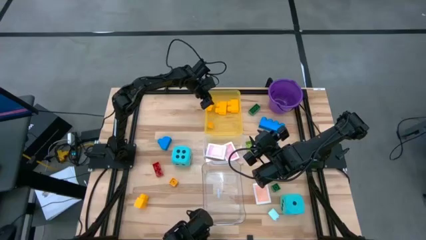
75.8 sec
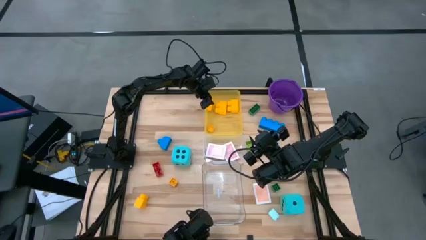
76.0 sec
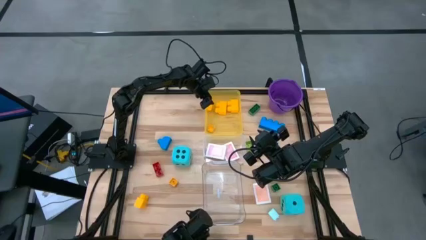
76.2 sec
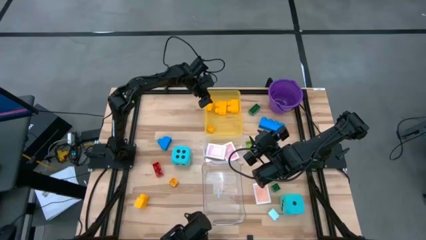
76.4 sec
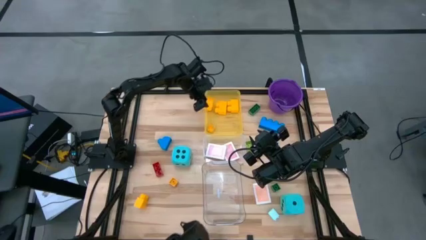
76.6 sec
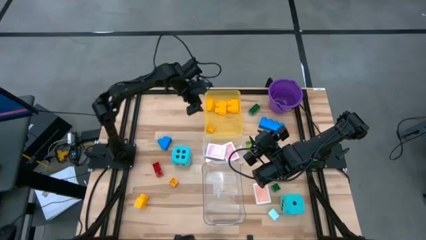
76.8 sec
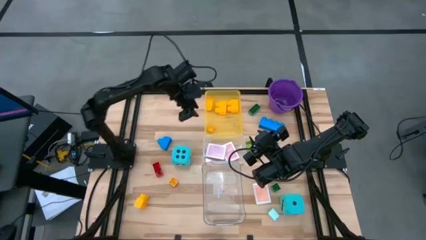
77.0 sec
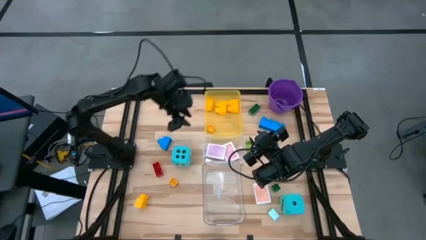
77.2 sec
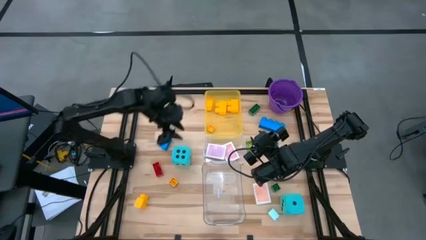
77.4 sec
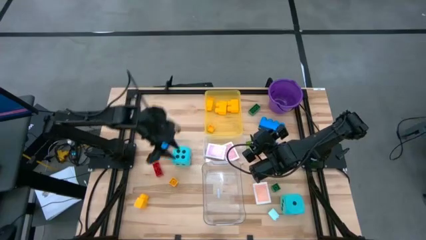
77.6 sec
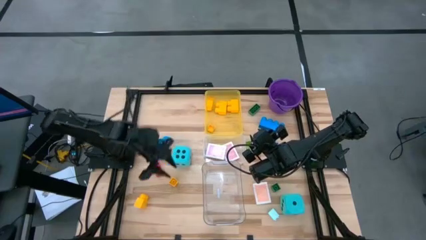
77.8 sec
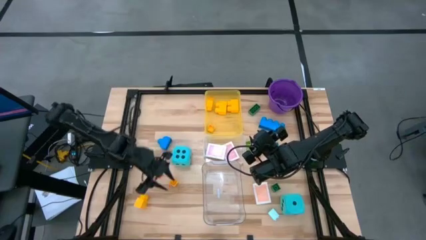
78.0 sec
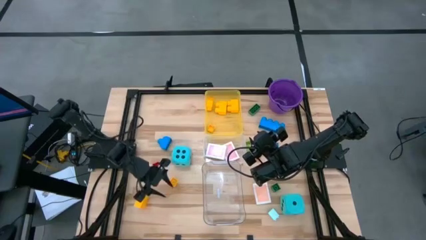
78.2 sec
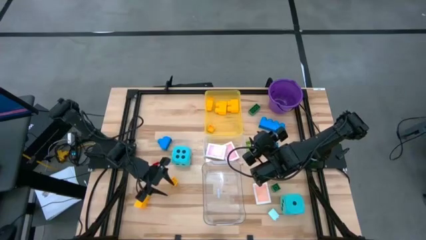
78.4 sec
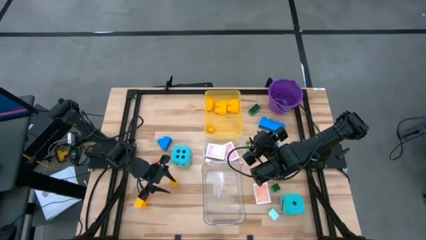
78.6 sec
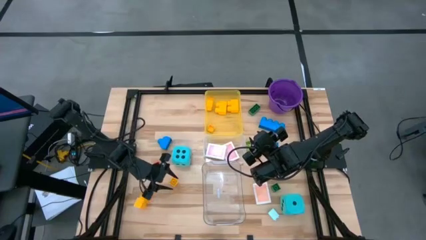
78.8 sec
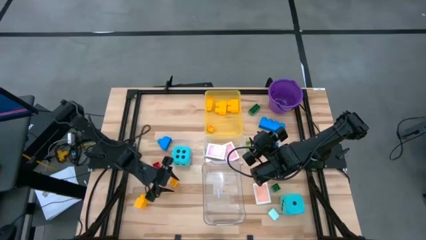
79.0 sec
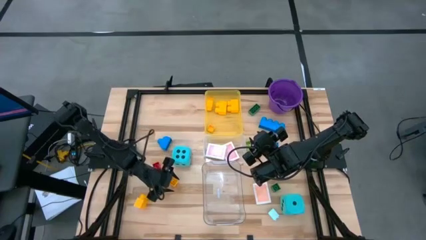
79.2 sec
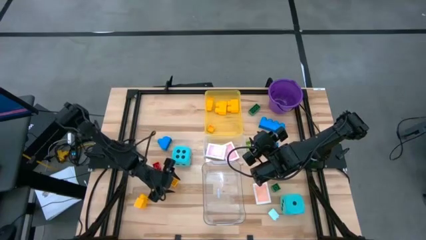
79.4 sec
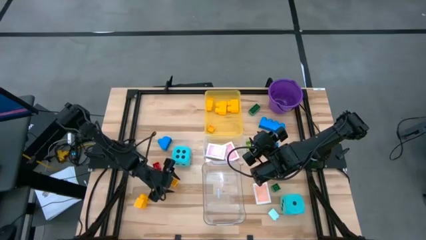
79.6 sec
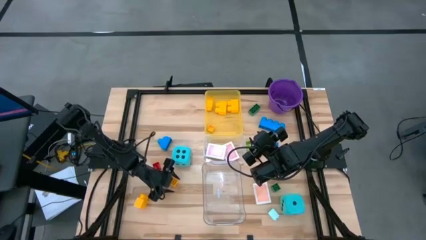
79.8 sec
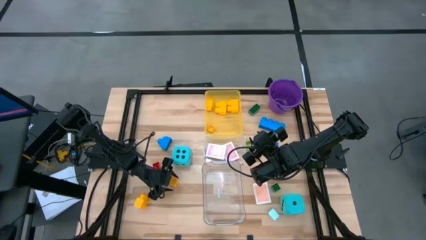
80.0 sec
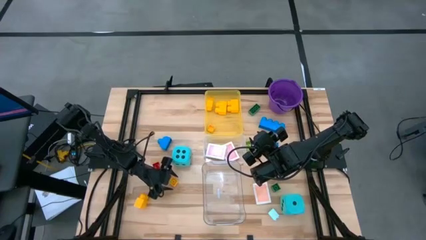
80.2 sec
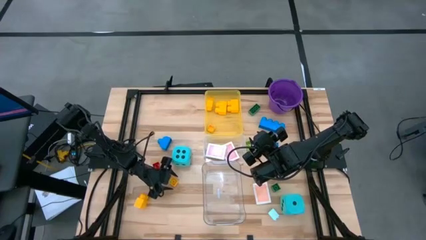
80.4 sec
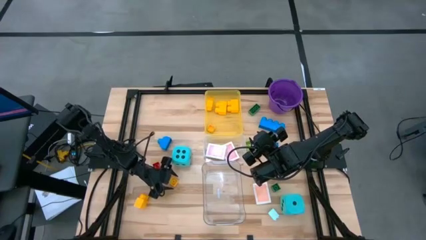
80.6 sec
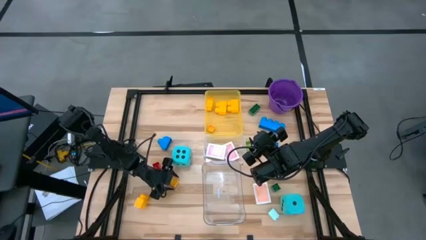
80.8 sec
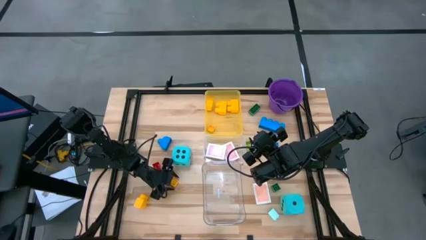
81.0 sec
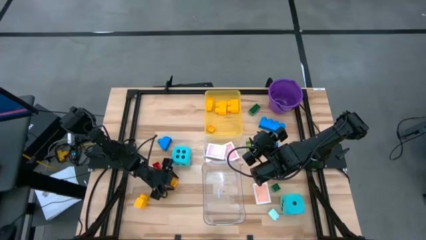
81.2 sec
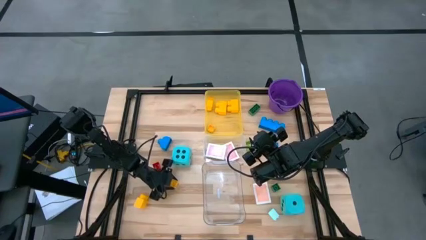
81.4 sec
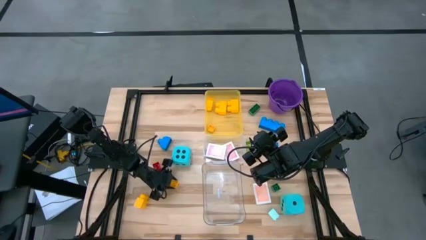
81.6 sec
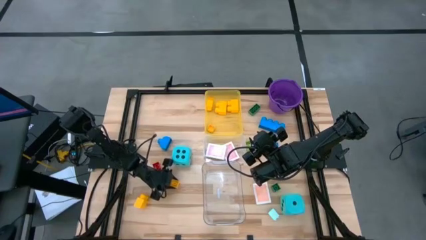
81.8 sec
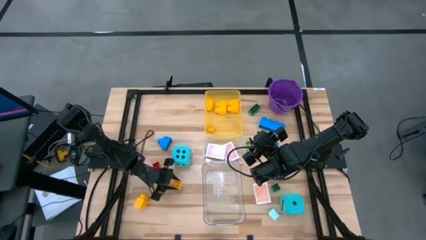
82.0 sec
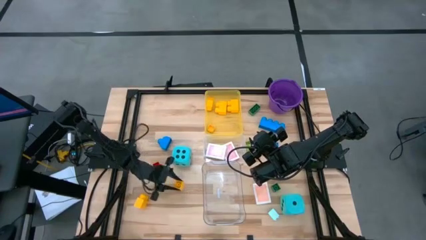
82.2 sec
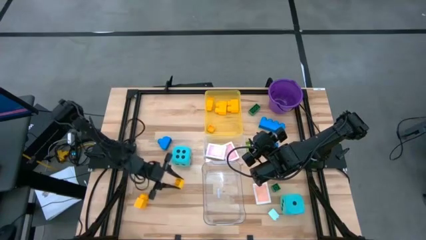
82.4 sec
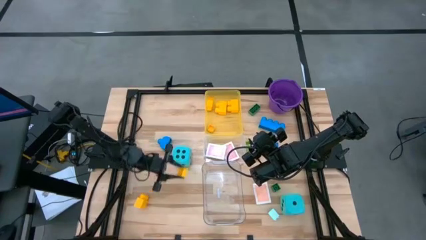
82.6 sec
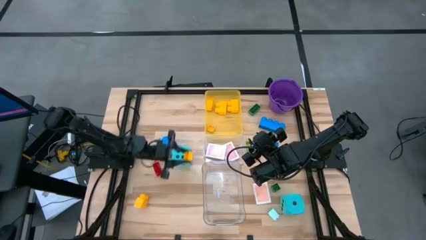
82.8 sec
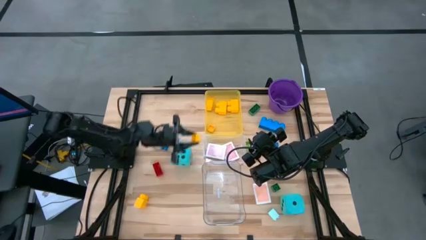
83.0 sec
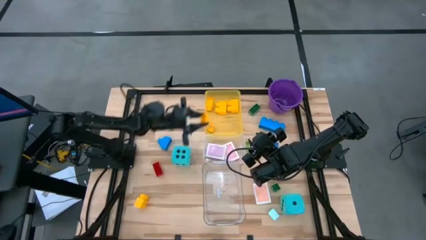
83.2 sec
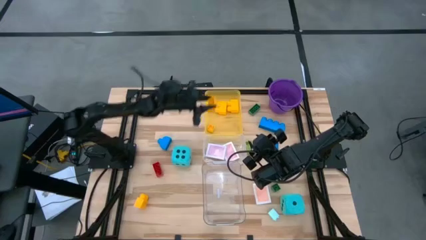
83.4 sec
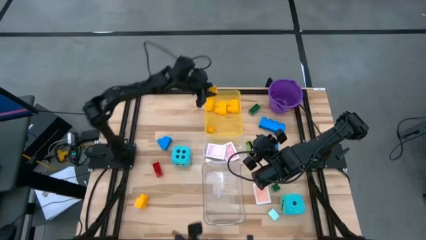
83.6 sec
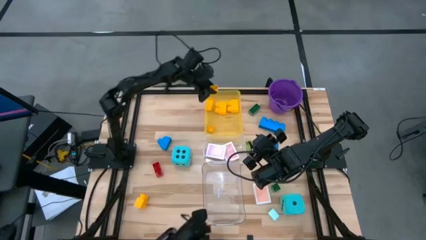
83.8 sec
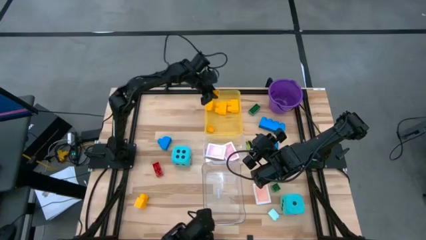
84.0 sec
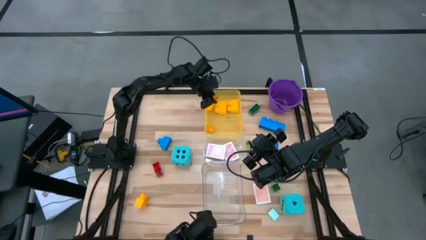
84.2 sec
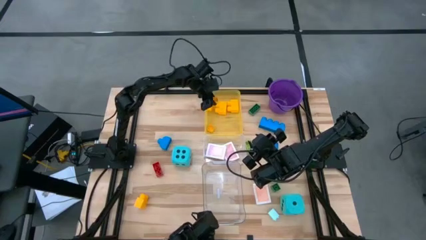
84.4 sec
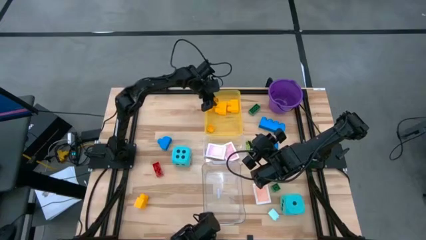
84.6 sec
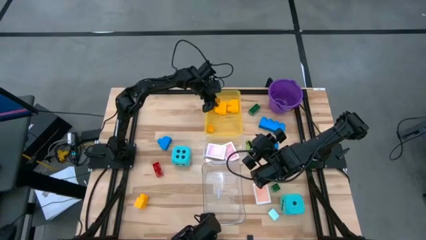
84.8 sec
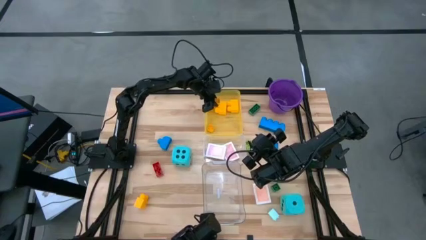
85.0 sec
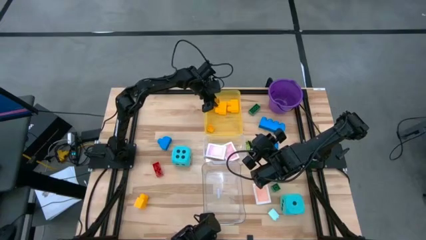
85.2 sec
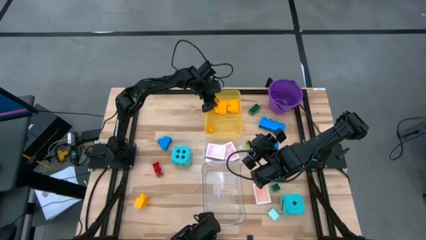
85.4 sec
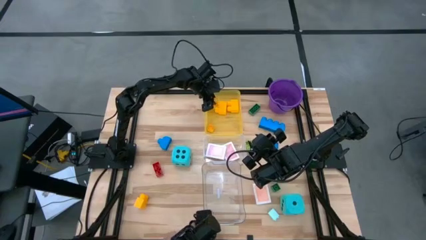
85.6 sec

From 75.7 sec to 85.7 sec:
Task: Pick & Place Toys
Put the yellow game piece into the yellow bin

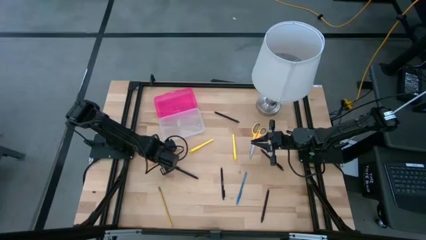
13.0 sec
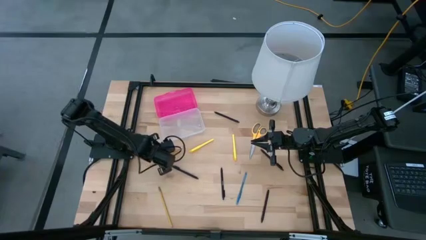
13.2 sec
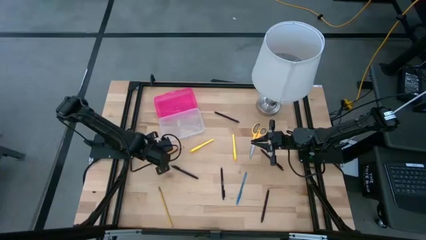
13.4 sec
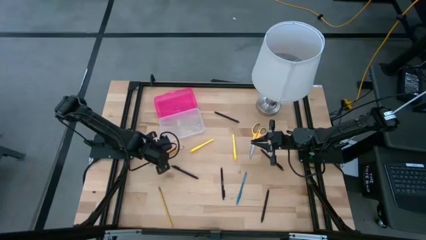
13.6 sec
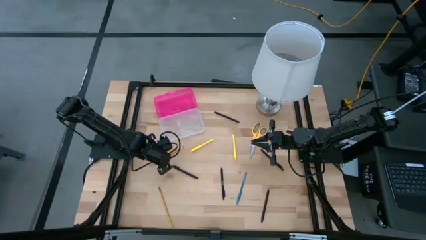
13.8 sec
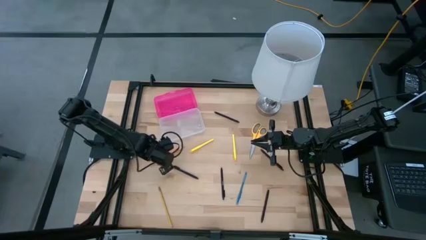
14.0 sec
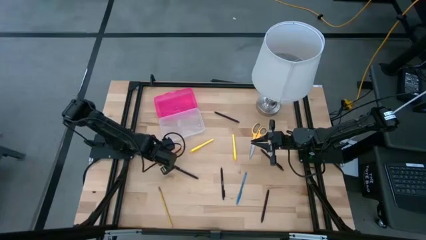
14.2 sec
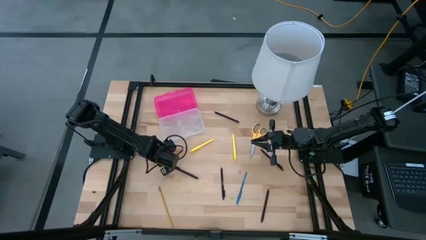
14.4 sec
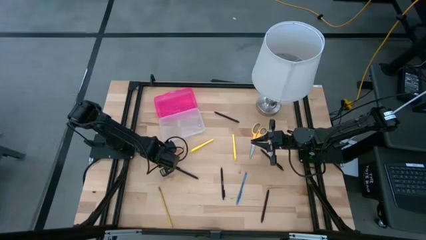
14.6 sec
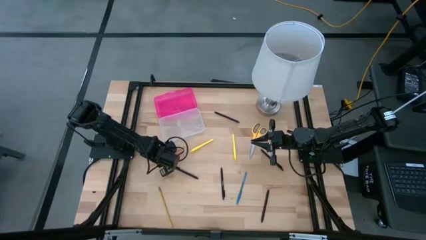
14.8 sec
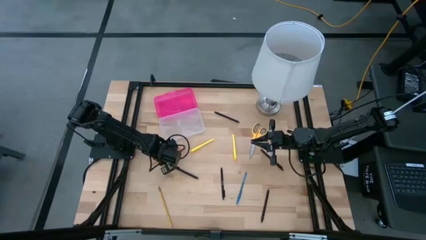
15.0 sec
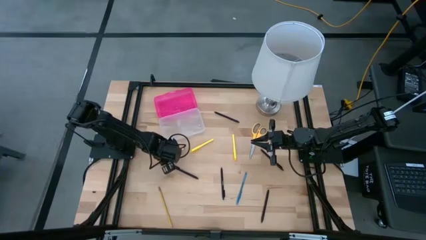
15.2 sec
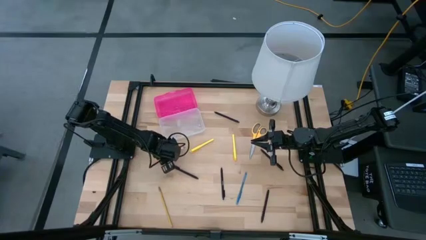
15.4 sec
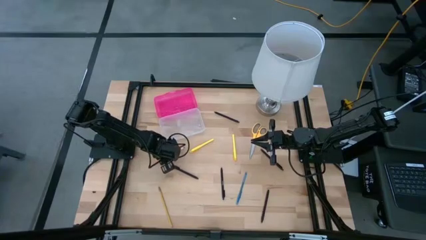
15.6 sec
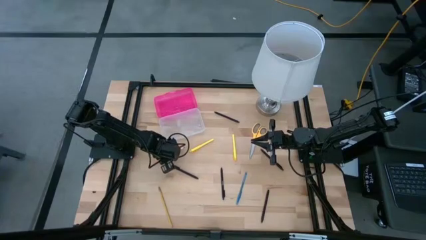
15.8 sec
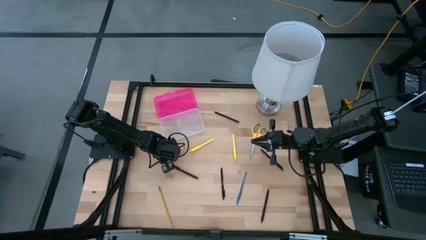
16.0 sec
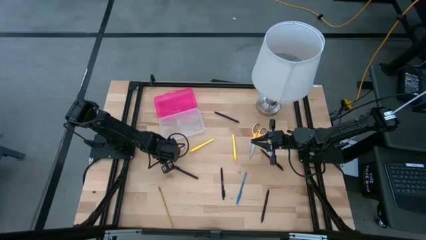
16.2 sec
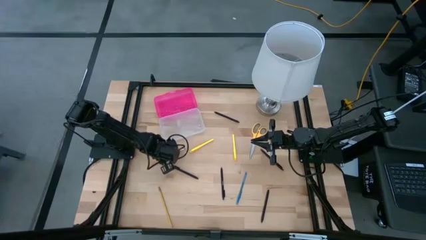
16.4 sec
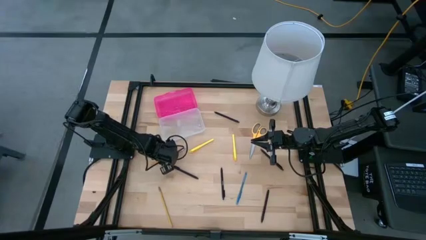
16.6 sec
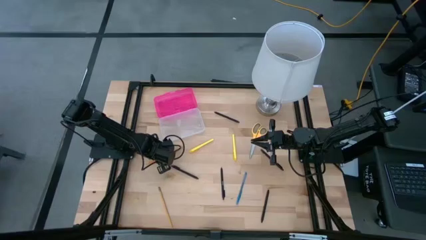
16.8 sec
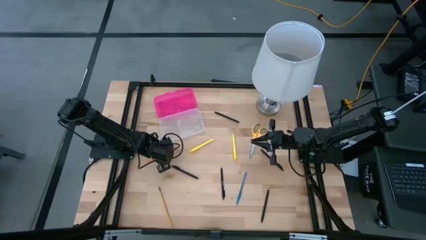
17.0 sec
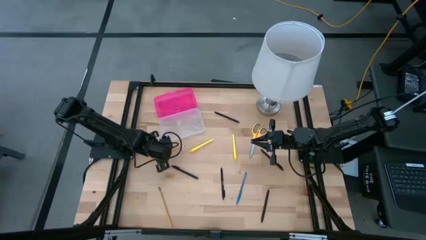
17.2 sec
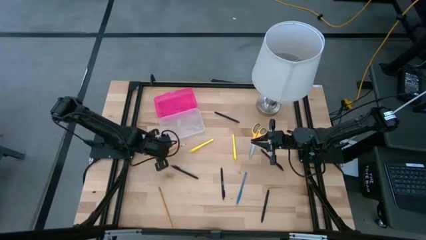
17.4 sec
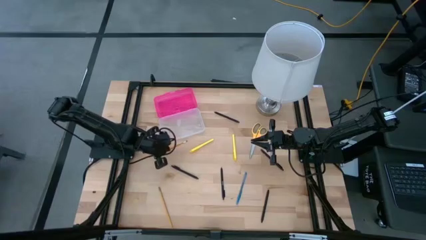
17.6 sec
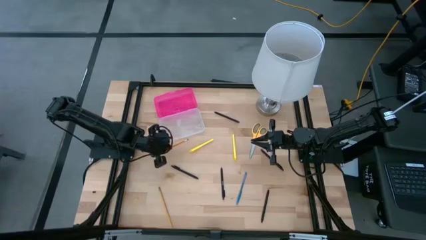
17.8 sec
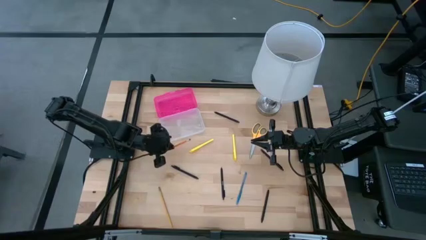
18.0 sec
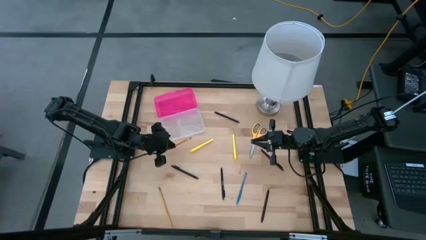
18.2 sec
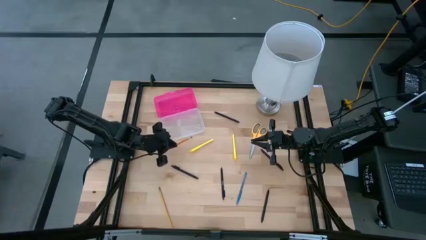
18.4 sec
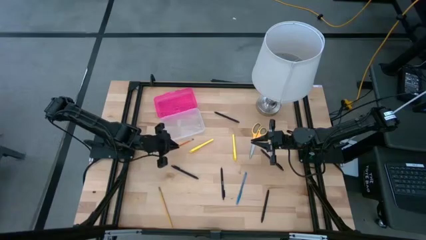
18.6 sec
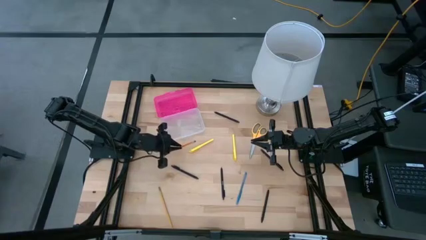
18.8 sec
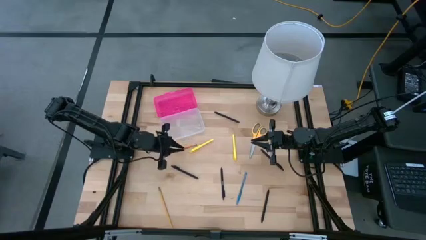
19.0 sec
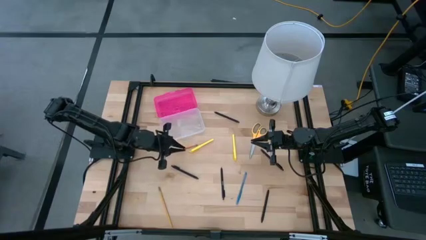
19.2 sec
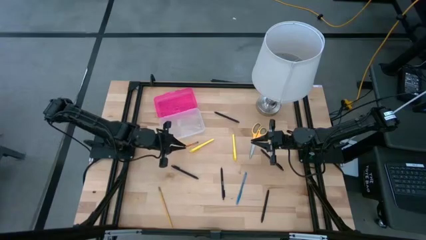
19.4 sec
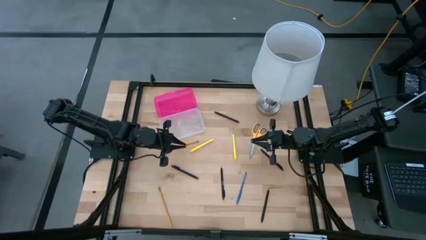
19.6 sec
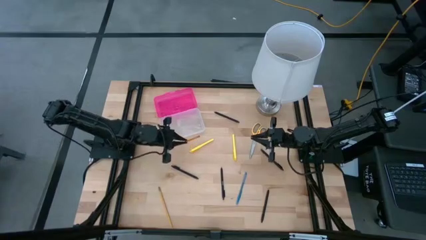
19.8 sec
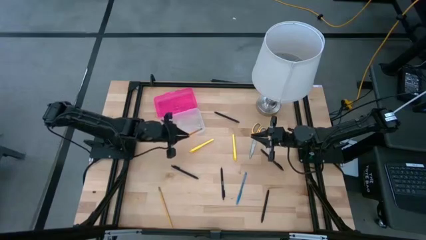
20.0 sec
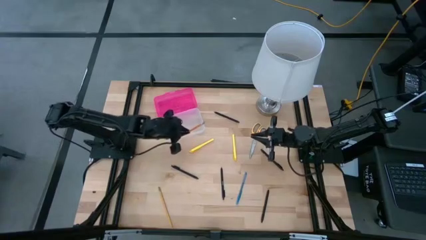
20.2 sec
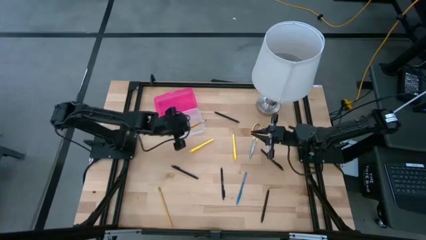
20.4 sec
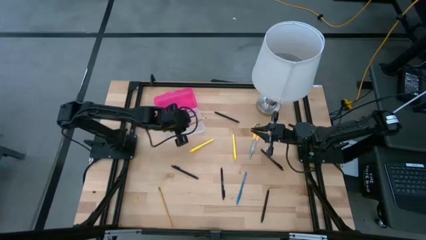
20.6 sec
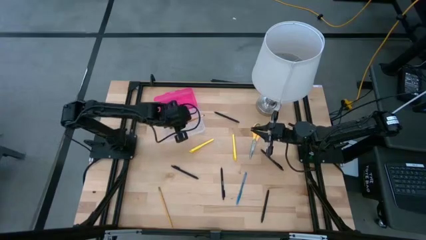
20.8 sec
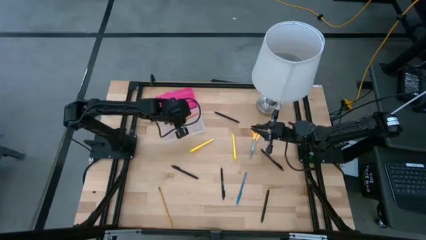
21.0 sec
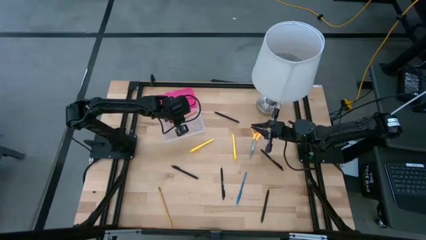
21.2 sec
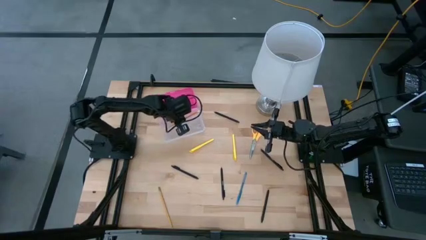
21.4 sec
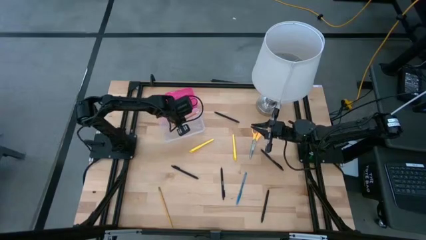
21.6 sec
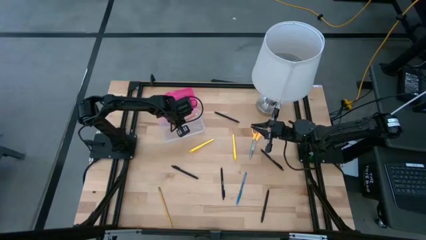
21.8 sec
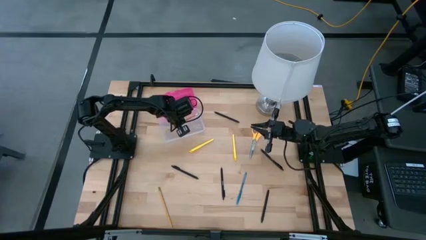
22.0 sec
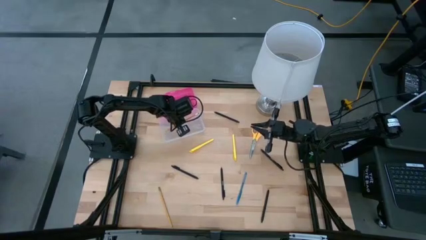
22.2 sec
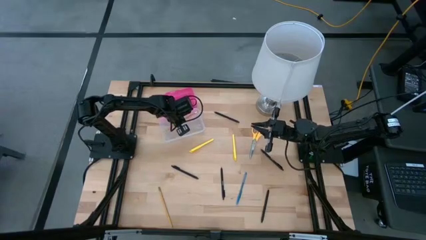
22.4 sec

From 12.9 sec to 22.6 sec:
Task: Pick & place school supplies into a supply box
Put the orange pencil into the pink supply box
